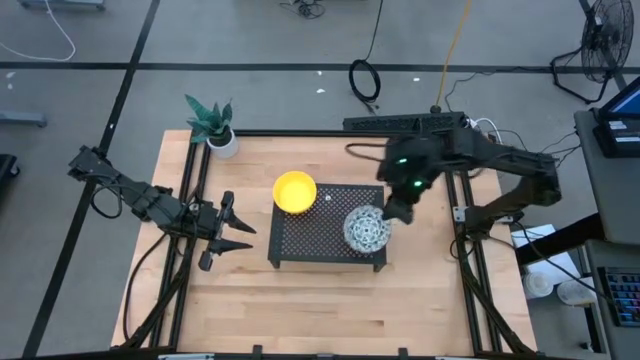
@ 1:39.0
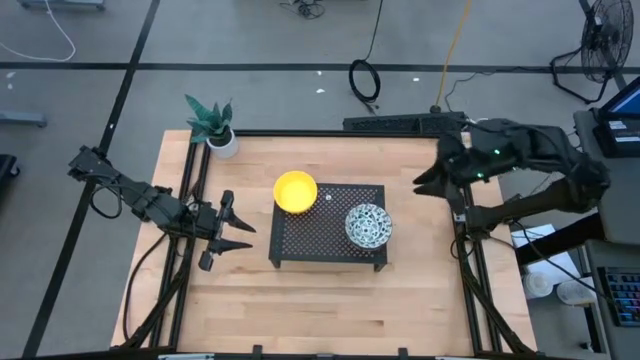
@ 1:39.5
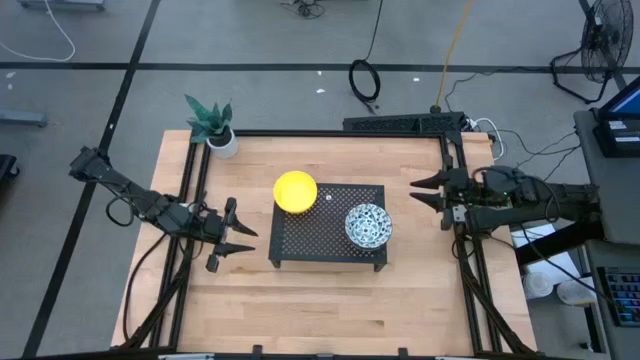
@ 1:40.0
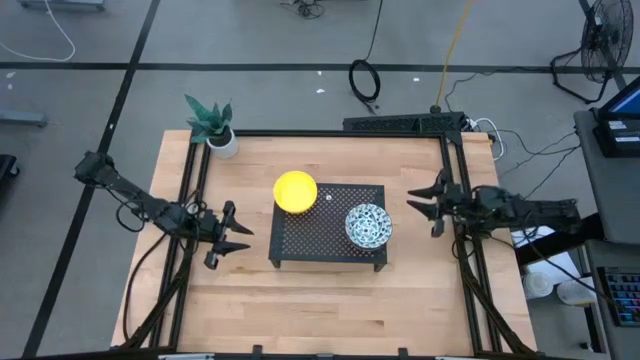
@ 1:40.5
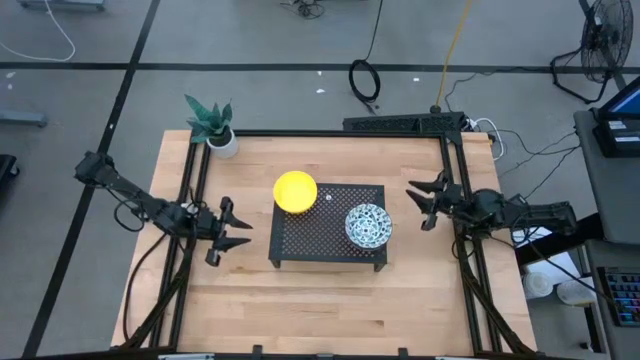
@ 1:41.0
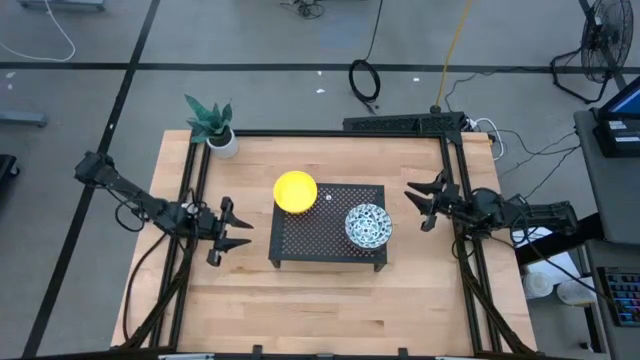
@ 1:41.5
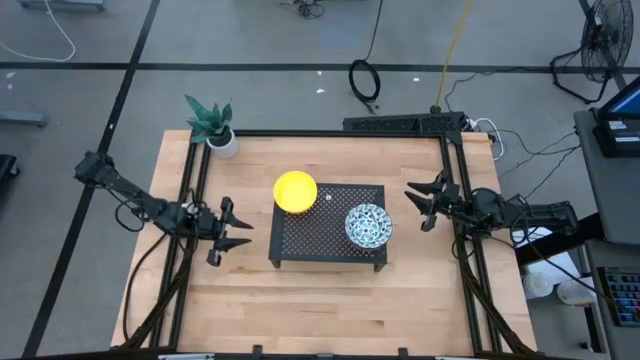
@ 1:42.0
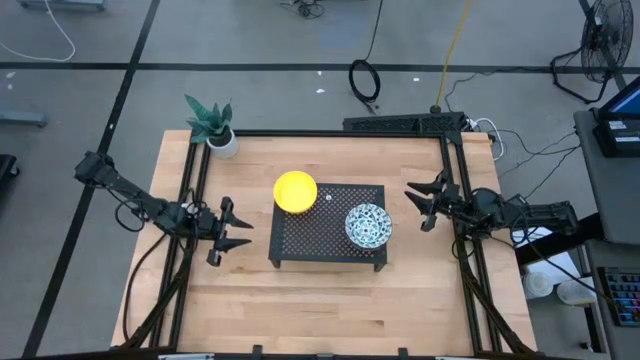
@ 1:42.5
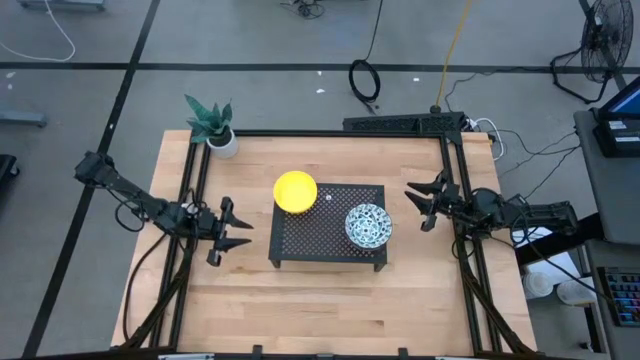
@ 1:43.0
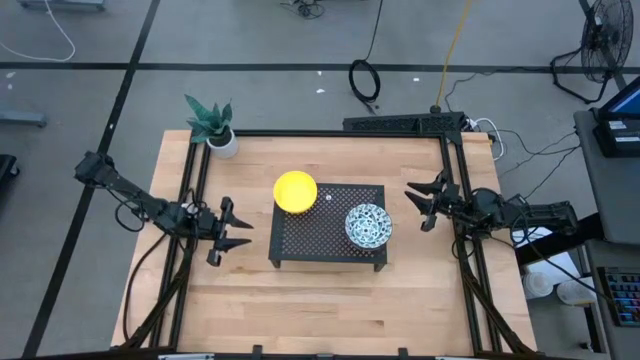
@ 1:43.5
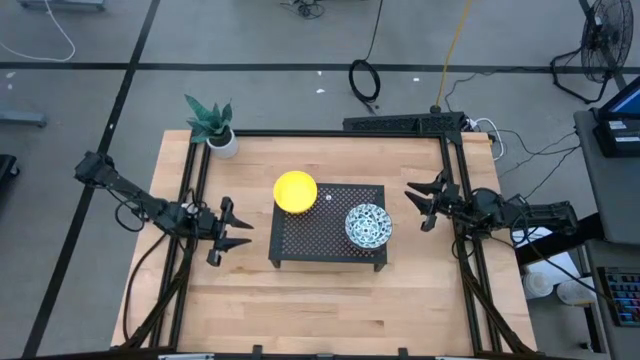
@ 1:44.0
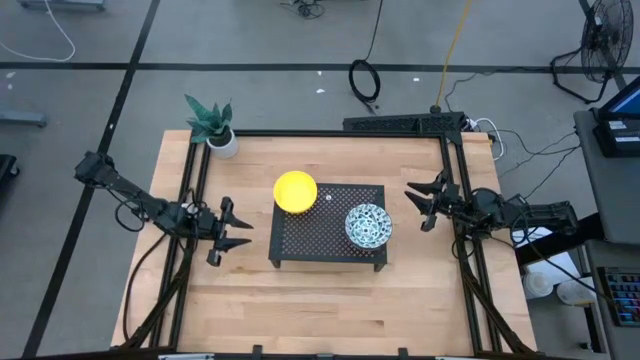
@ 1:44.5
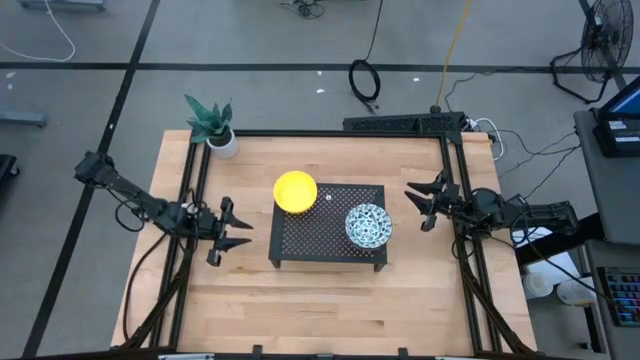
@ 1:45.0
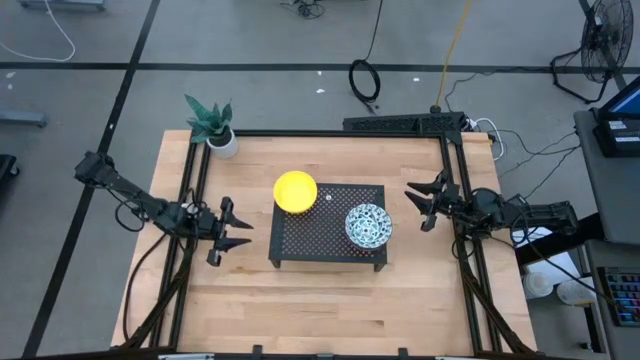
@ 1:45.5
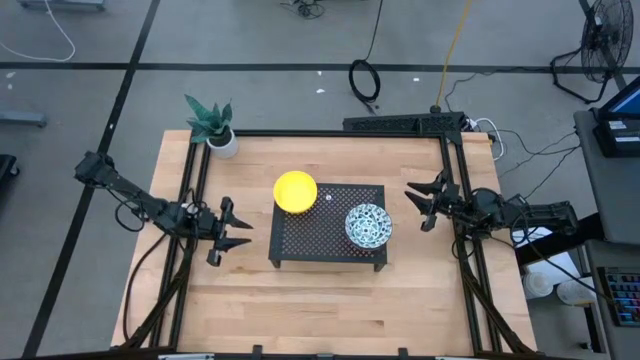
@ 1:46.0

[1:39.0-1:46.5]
Task: Pick & Place Mini bowls
Return to Home Position

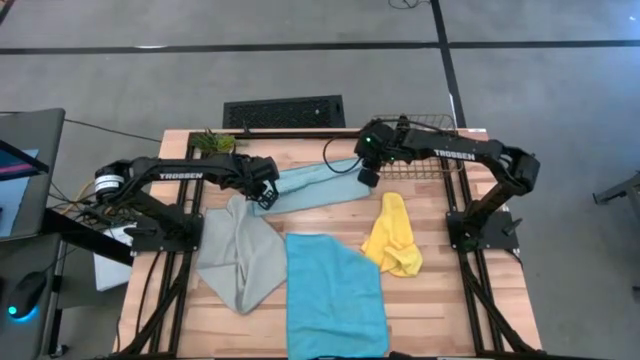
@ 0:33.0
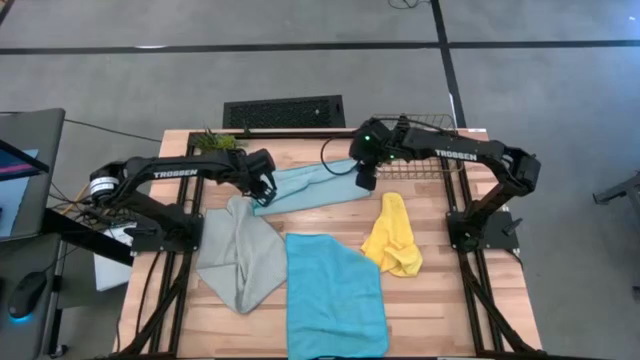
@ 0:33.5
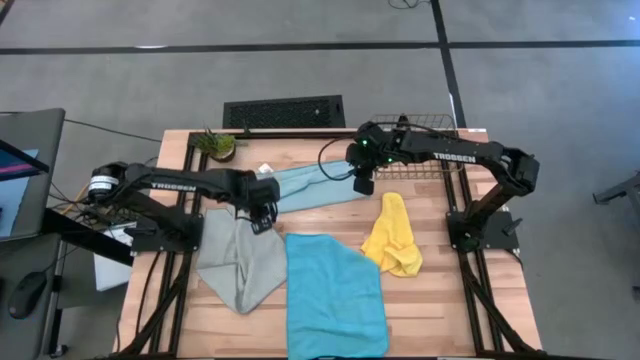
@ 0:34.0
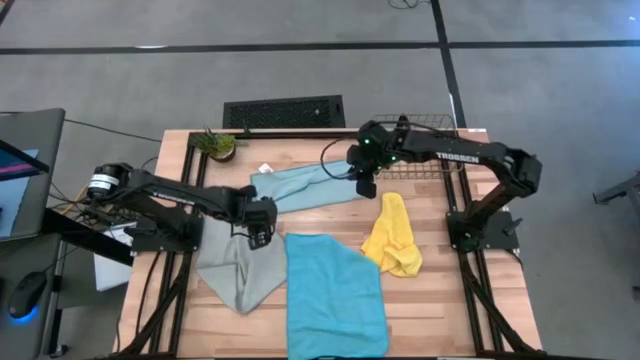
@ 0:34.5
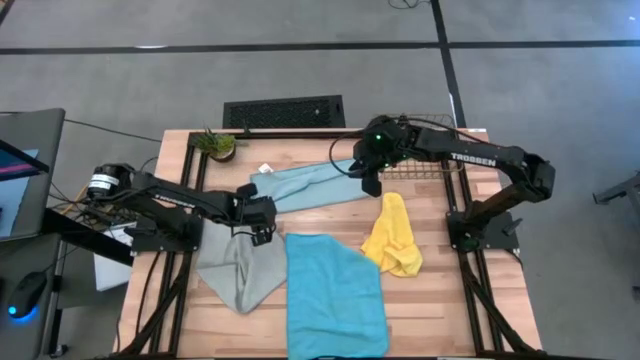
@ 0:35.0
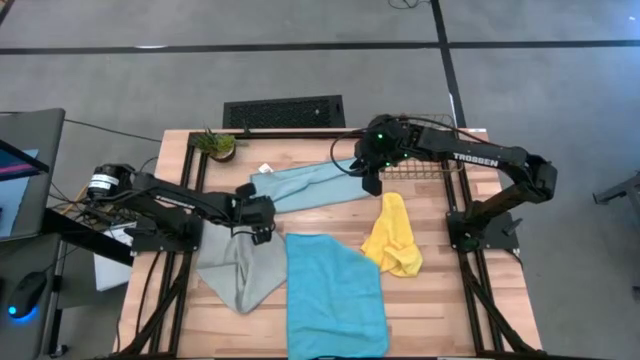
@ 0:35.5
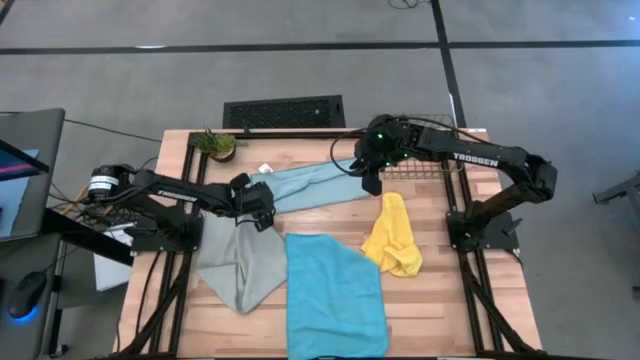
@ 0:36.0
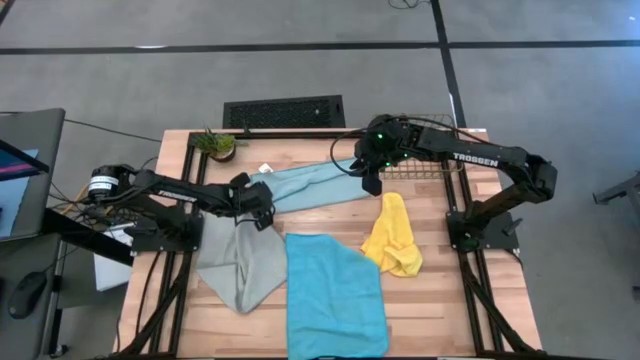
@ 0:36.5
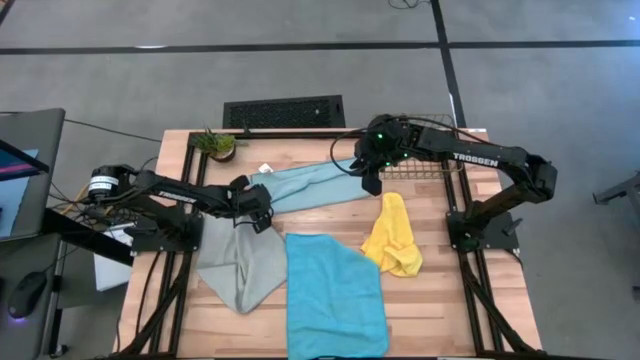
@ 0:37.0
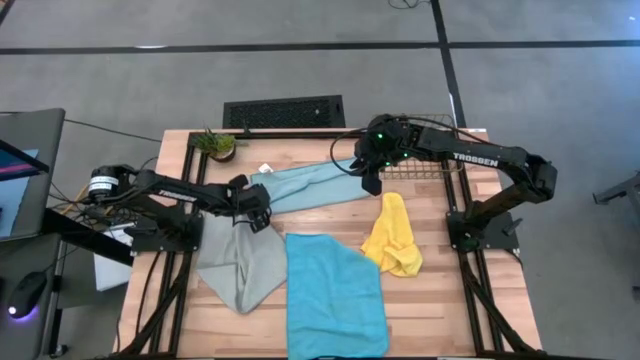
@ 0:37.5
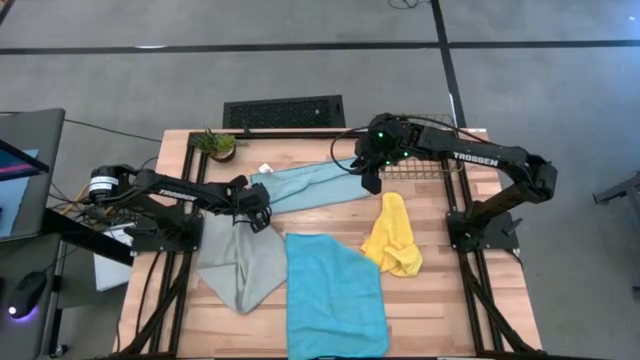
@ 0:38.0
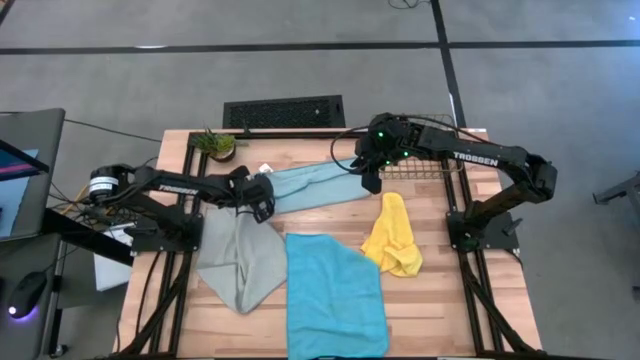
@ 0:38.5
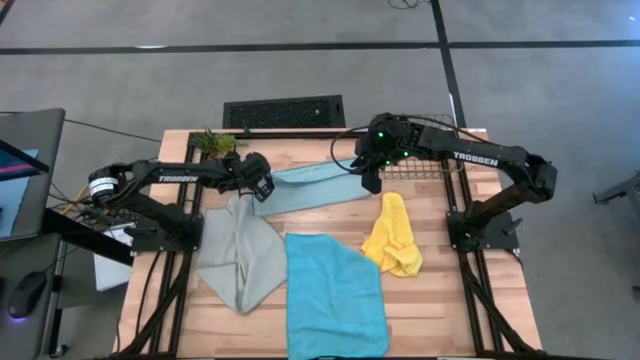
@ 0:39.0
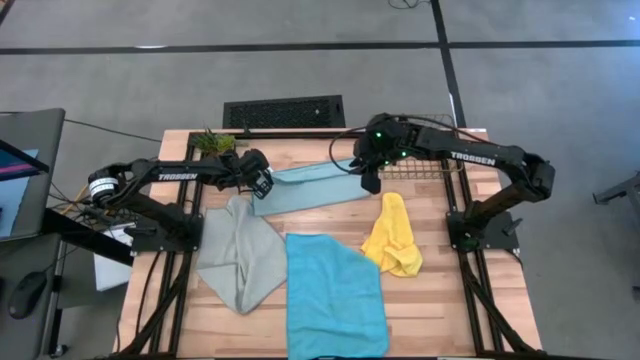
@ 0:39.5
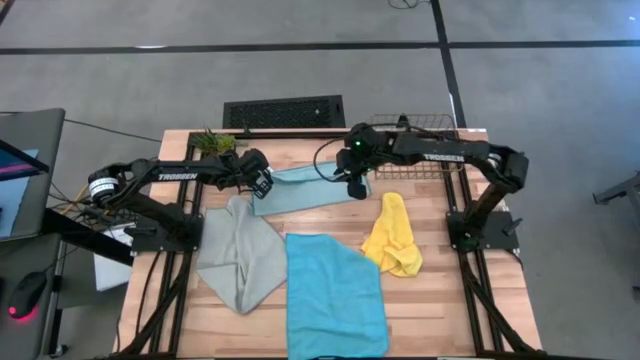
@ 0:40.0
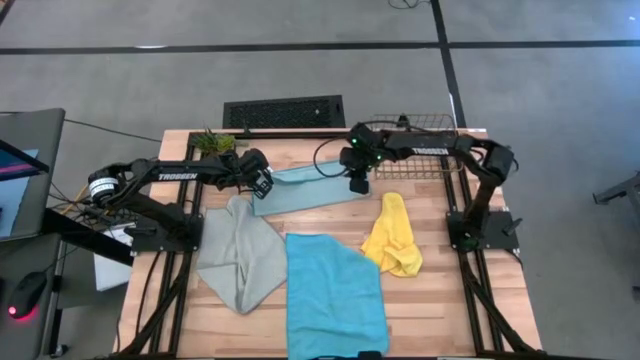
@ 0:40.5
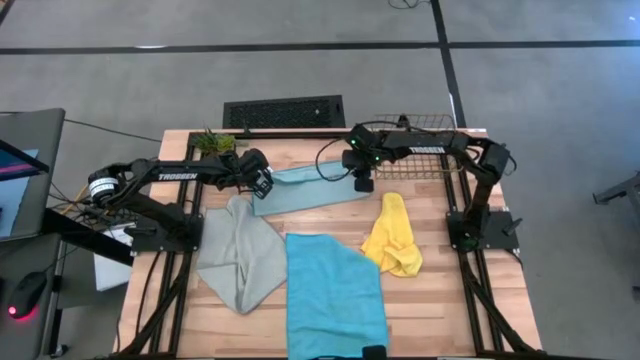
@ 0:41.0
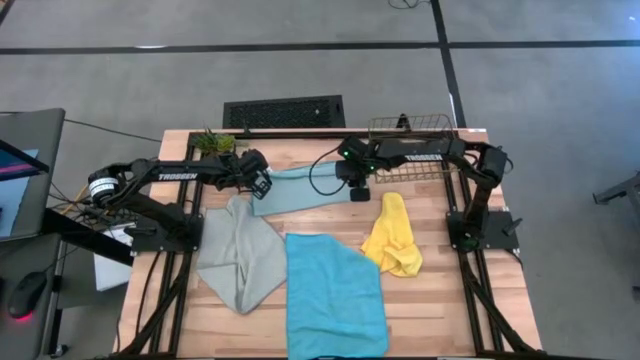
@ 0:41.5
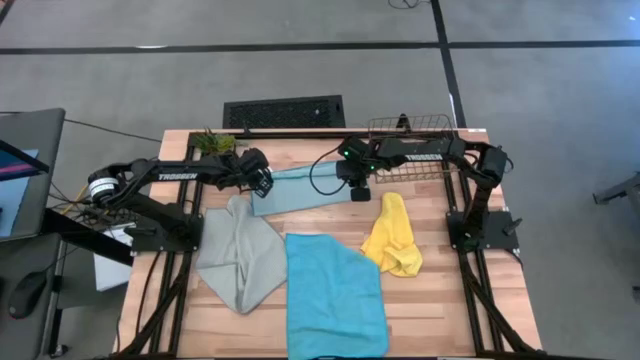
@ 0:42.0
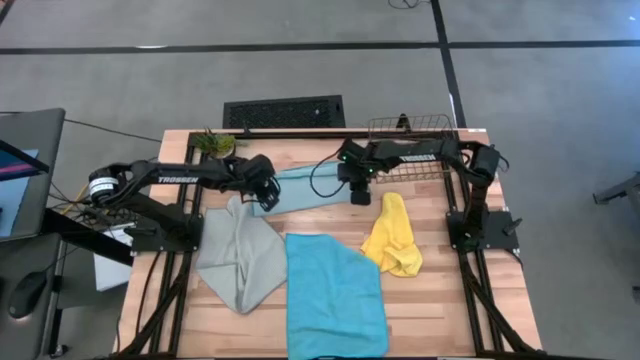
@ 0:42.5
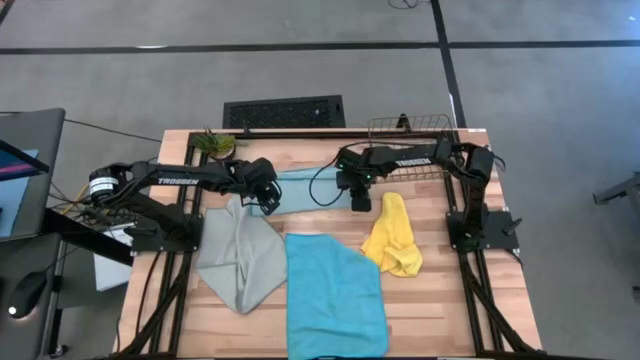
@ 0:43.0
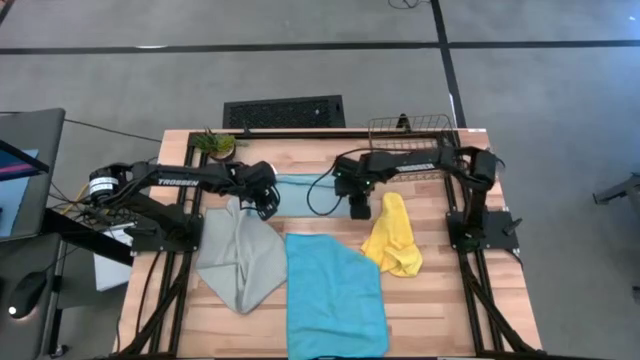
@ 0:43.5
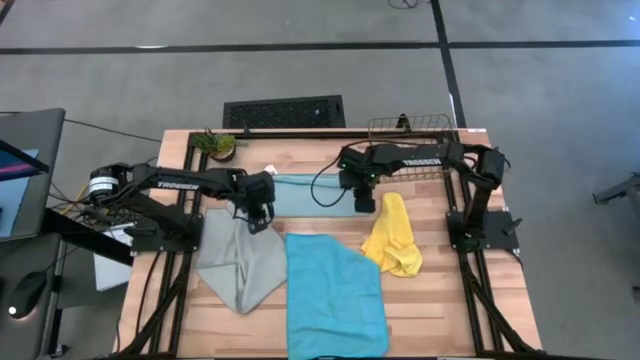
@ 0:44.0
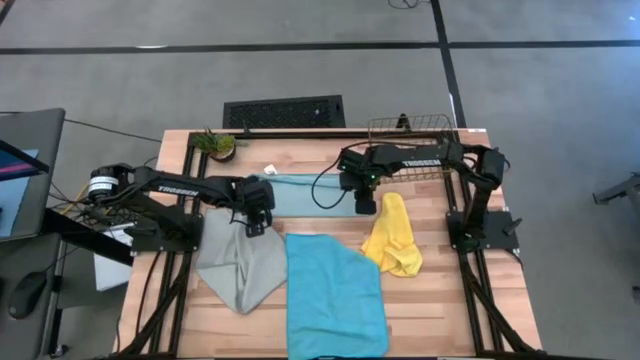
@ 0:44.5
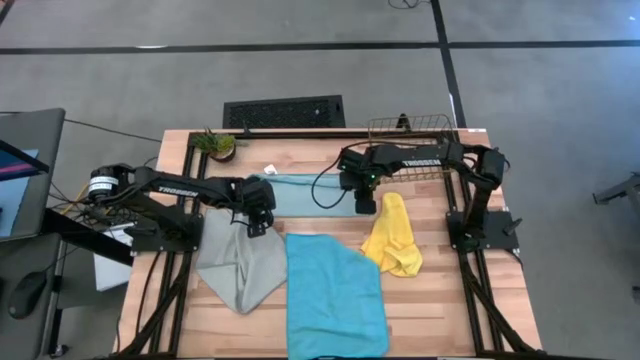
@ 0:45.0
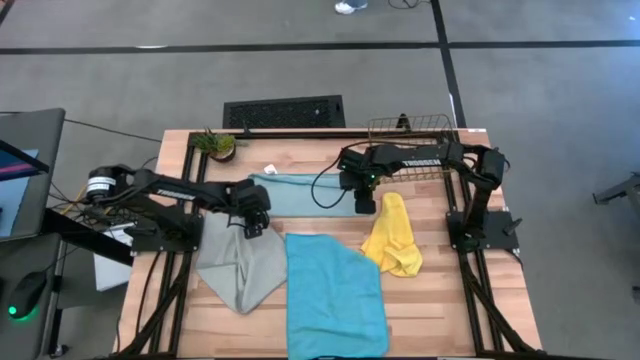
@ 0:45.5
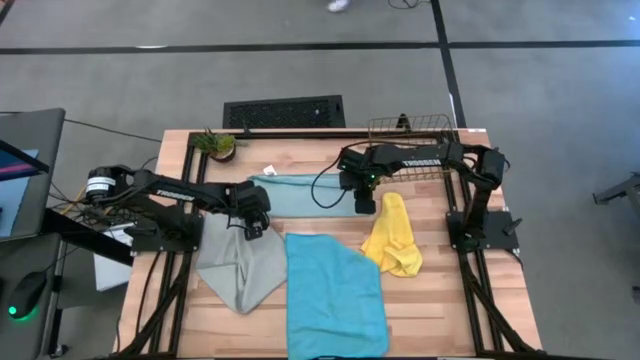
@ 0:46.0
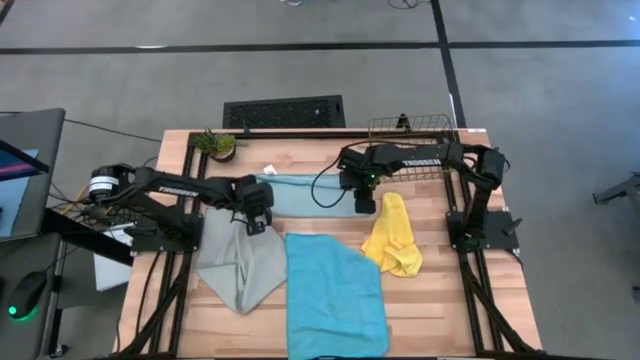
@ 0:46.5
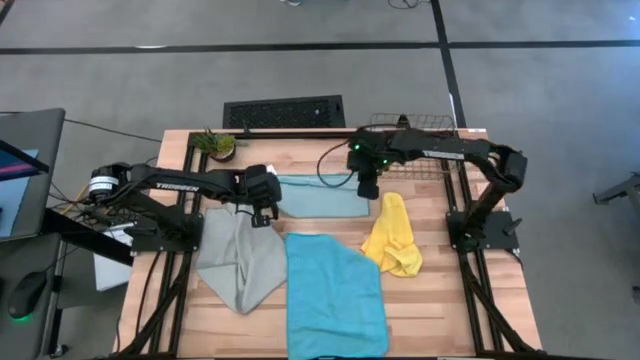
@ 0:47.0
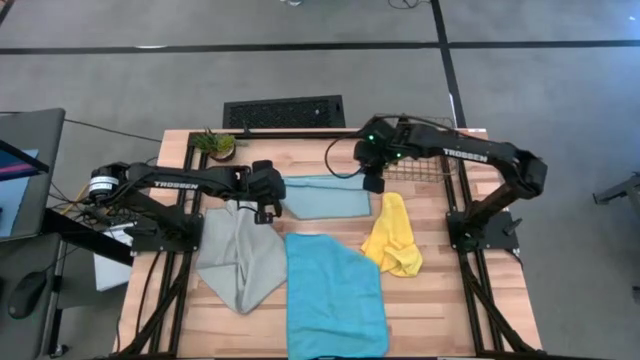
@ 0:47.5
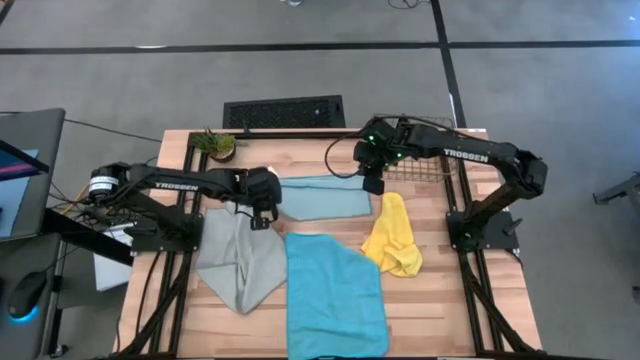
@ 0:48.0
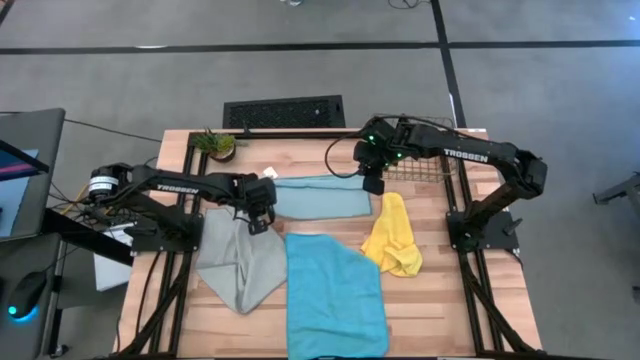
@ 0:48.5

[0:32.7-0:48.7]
Task: Fold microfiber towels
Fold the light blue microfiber cloth
